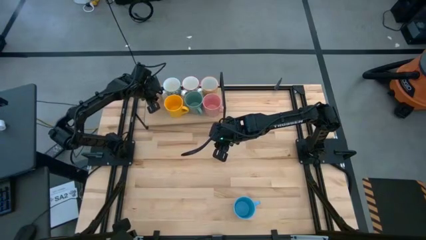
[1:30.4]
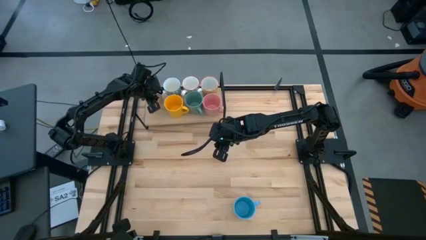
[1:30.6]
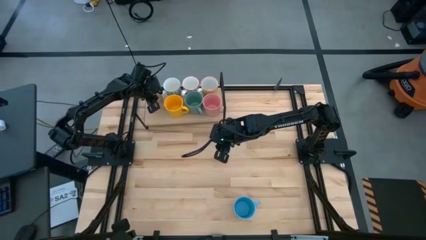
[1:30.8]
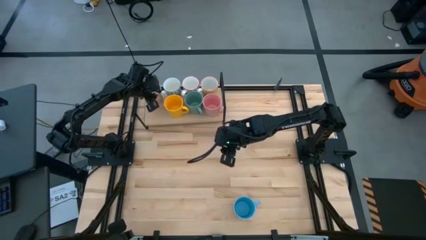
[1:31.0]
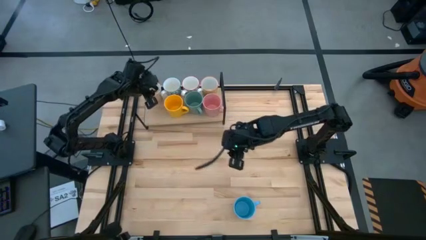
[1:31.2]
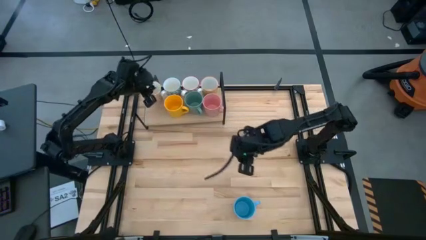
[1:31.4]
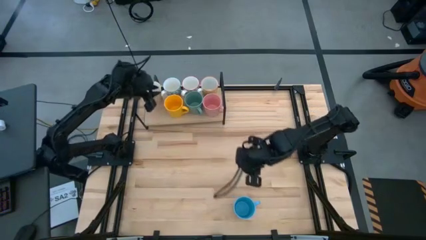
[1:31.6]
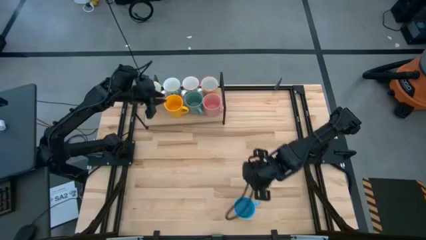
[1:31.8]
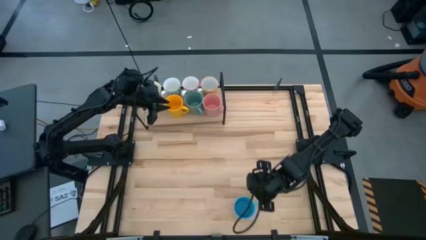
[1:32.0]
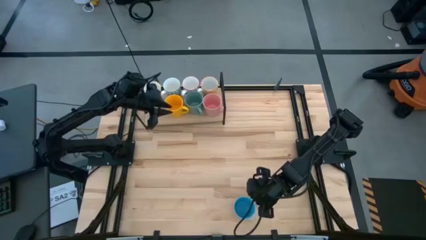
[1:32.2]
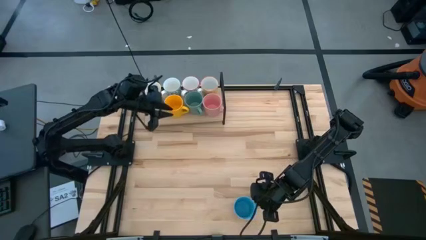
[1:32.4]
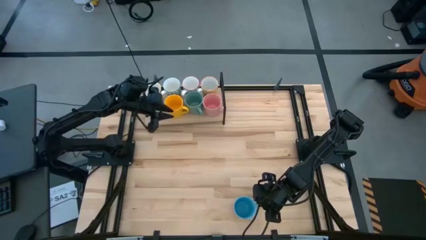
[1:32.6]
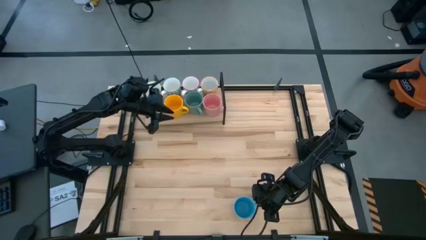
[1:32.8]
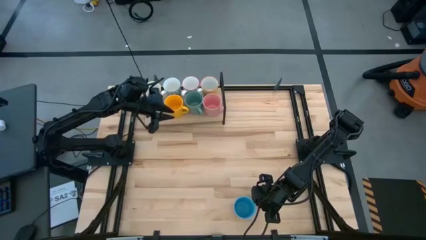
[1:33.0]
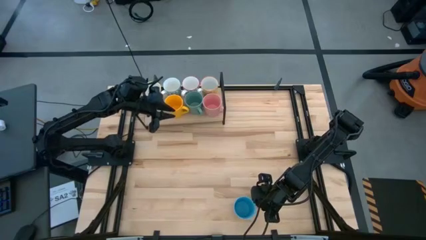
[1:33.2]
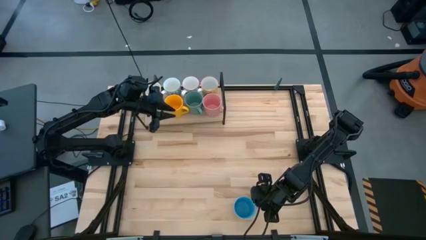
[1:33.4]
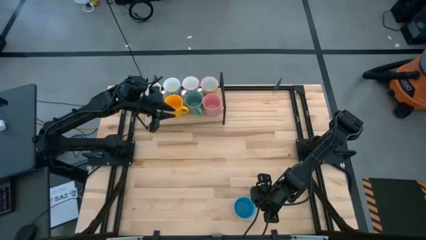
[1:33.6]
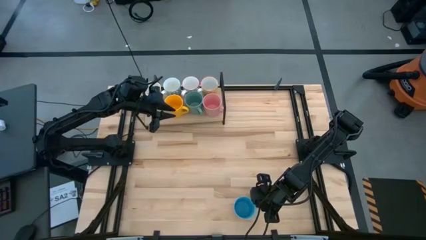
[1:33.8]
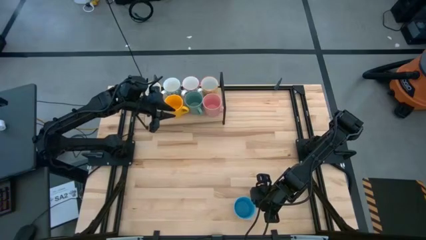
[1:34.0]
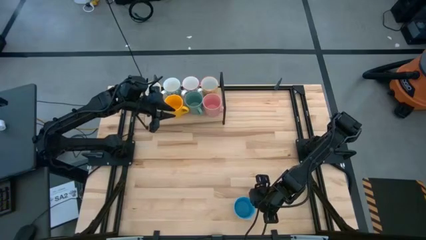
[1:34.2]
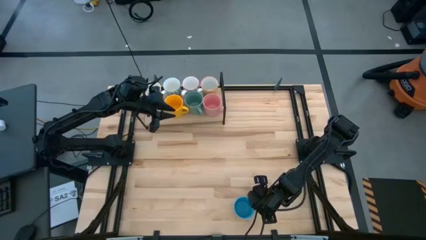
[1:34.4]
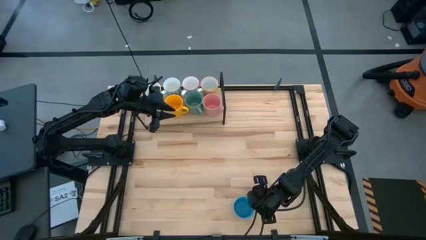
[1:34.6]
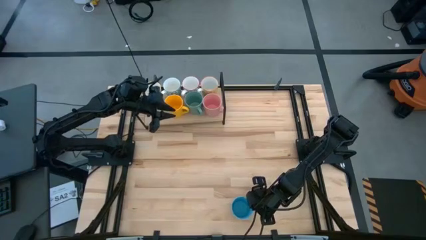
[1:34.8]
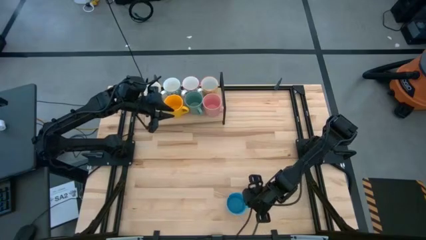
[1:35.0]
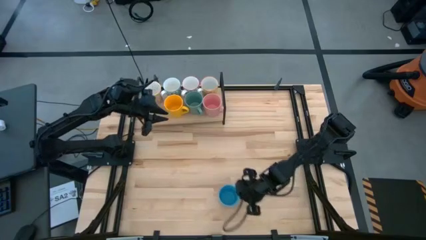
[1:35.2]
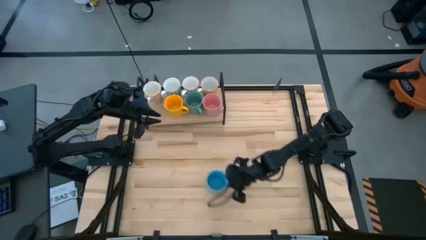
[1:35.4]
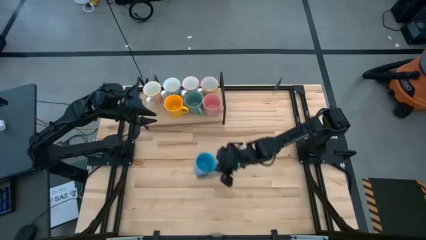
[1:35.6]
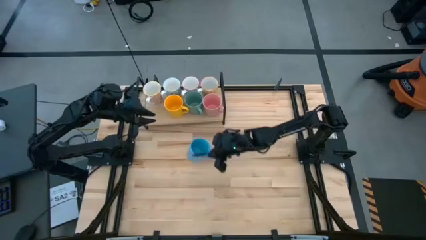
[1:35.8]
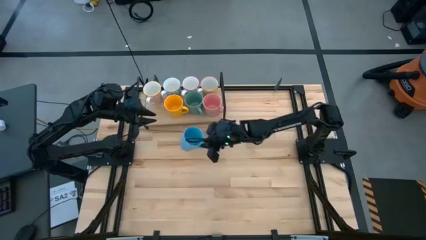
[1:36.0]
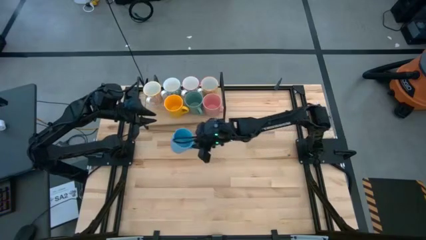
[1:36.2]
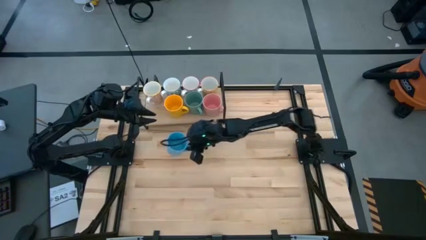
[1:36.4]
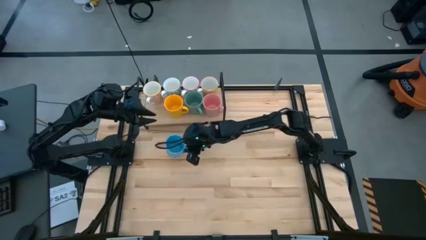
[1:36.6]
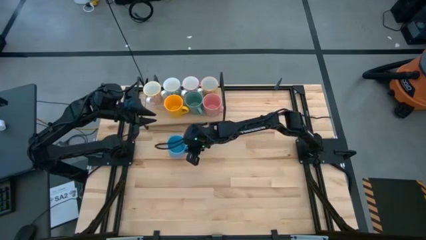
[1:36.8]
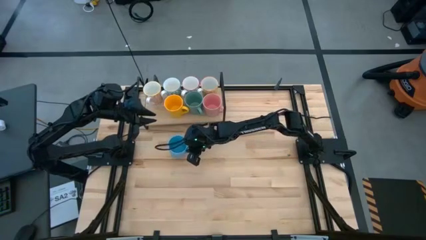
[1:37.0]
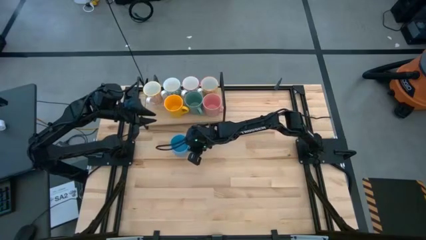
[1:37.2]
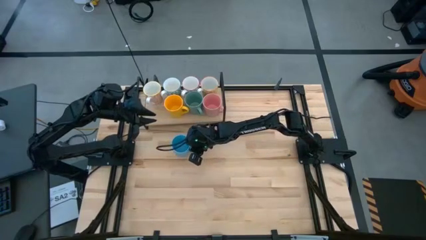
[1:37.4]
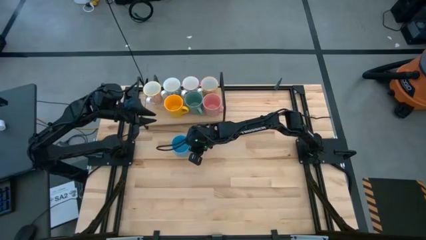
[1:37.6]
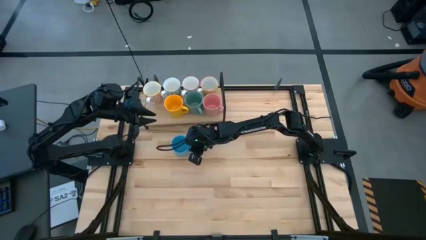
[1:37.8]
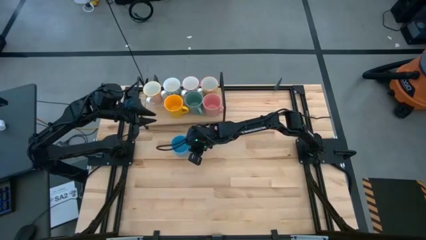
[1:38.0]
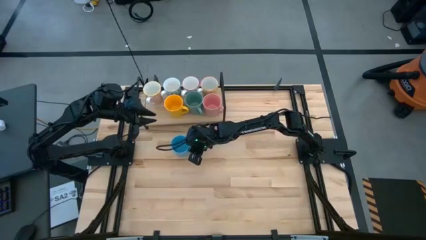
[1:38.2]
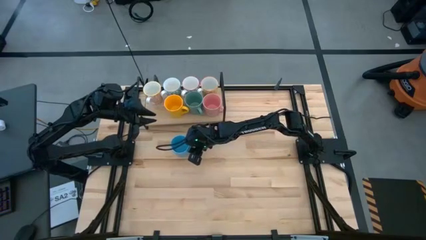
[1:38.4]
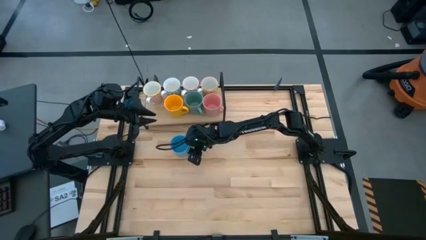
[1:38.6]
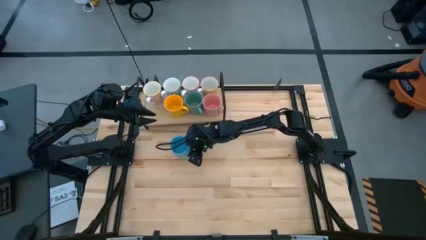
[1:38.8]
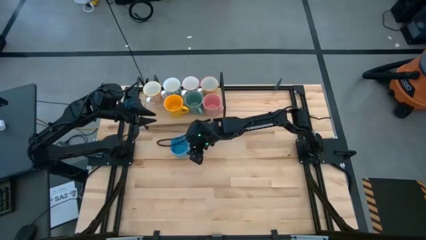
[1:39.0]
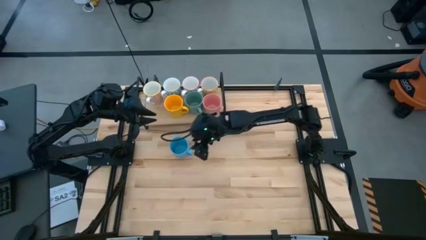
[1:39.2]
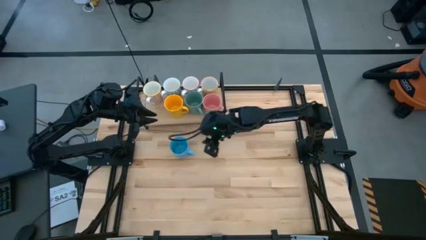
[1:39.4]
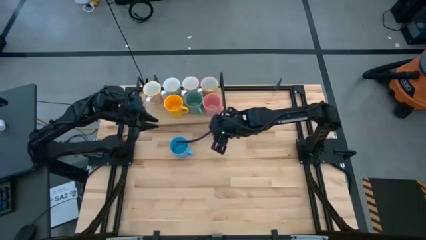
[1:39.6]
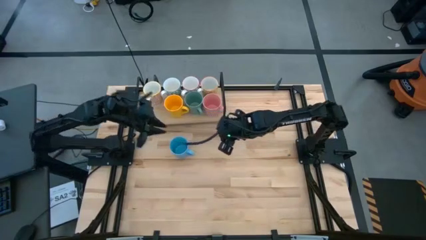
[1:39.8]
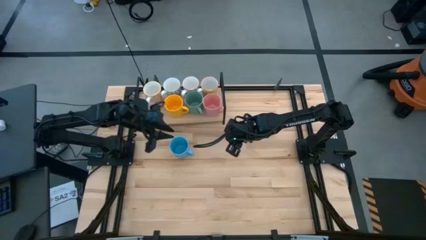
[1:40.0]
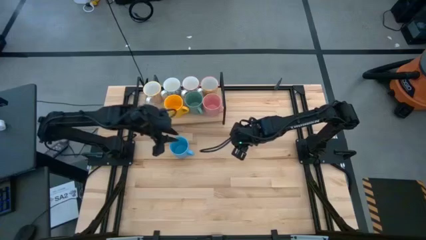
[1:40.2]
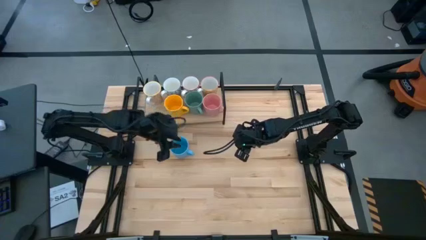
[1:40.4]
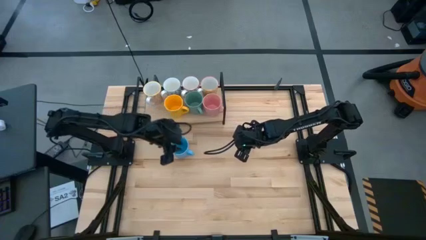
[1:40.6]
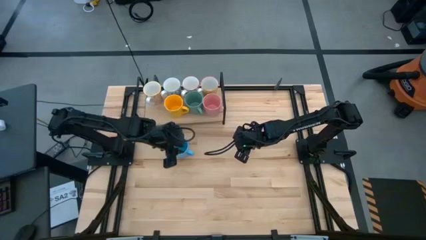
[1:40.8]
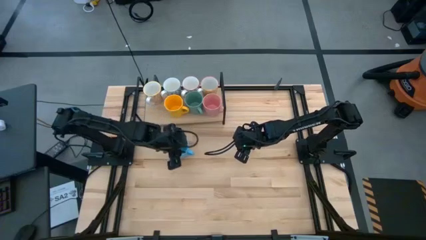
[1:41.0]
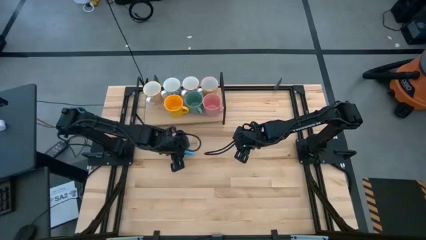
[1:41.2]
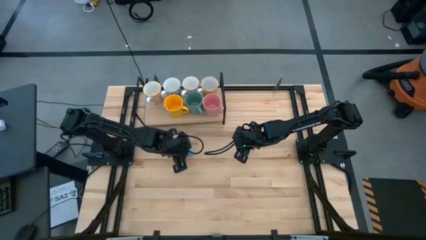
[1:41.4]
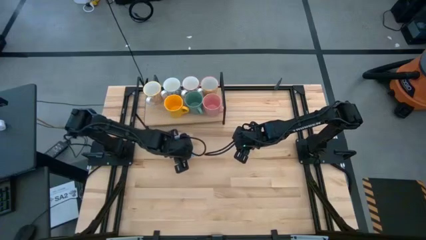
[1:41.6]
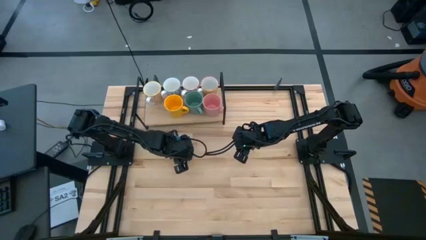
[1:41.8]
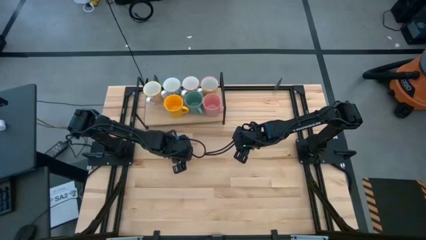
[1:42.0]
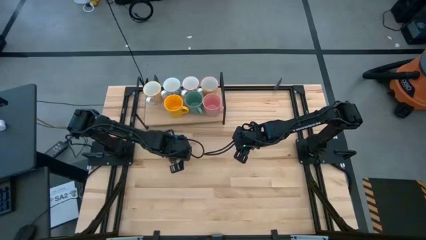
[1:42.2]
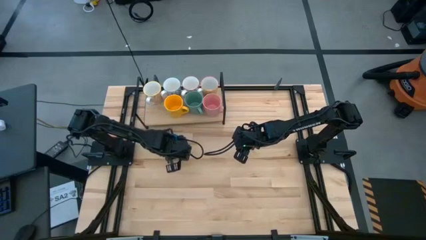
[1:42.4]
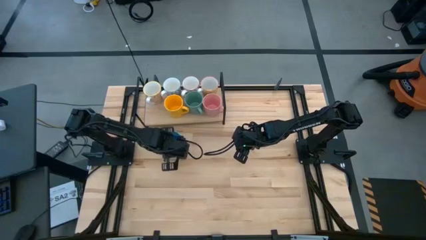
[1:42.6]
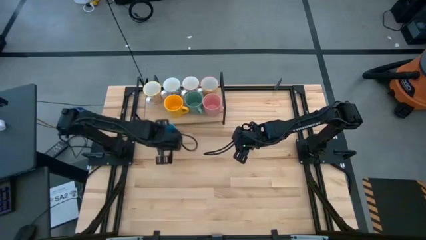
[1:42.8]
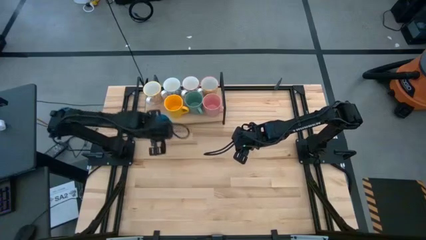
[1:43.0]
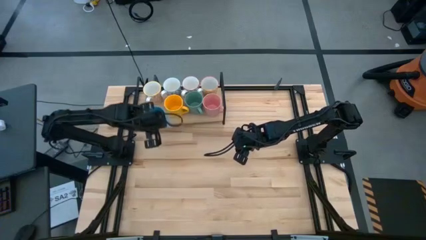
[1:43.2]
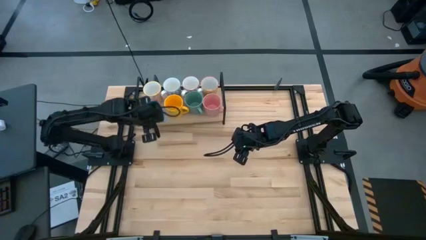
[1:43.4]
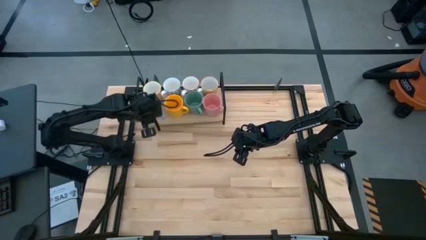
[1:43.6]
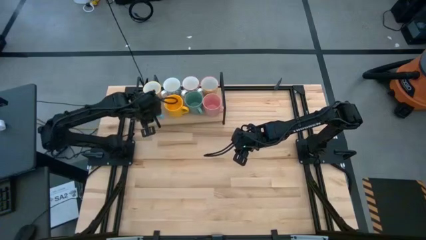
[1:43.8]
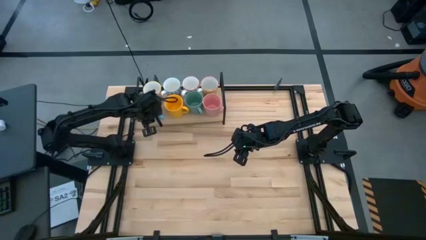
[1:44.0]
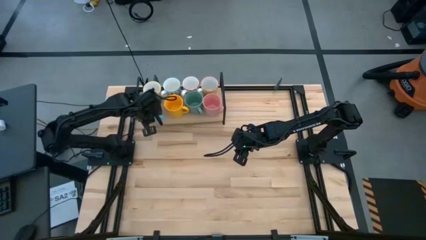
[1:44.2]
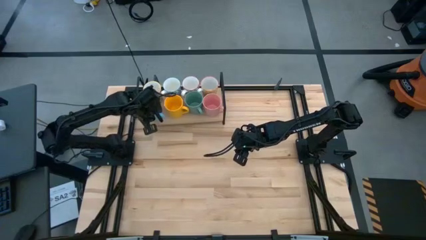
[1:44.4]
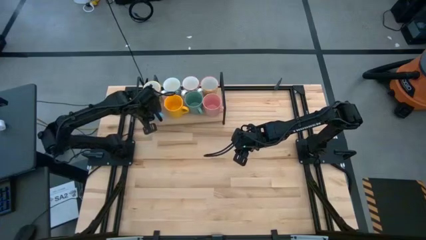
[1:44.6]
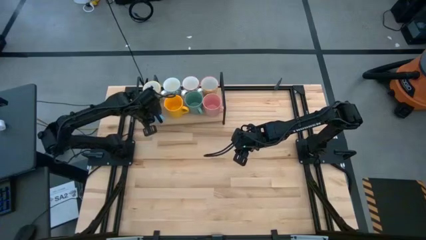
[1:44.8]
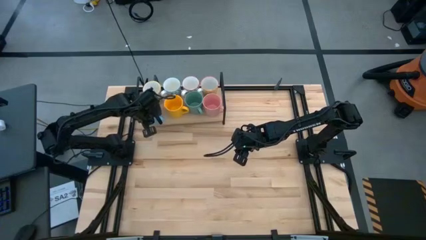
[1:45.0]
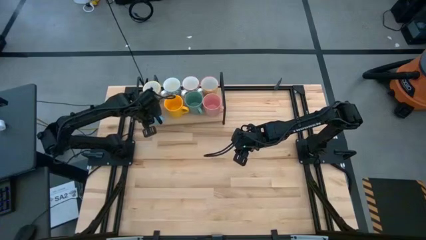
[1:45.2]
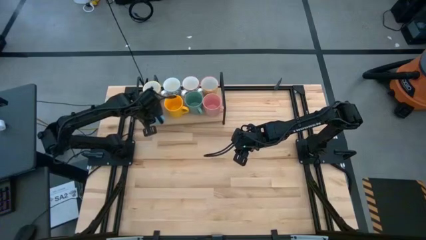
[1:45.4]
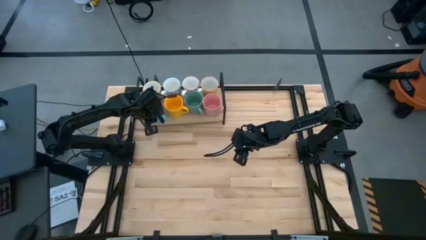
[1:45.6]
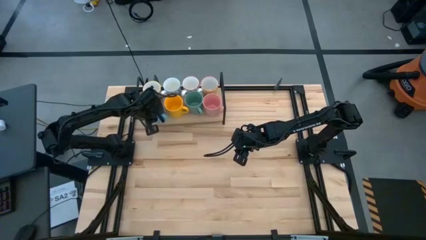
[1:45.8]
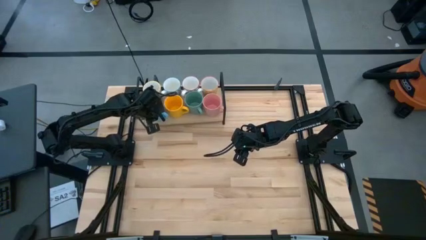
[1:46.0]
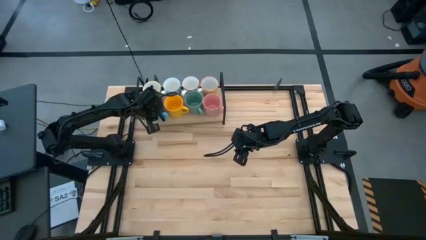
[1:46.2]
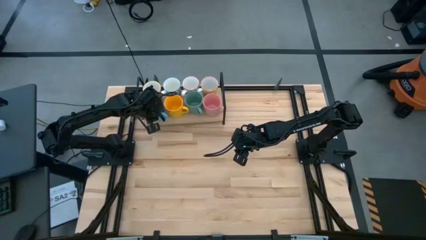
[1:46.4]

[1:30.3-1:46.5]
Task: Place coffee mugs
Put the blue mug on the shelf
